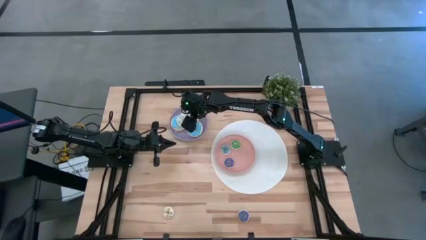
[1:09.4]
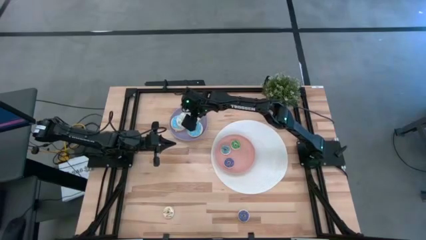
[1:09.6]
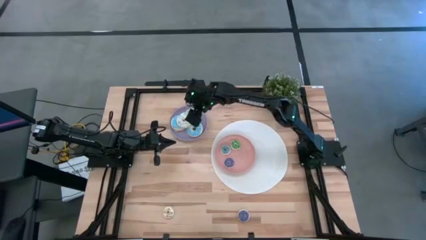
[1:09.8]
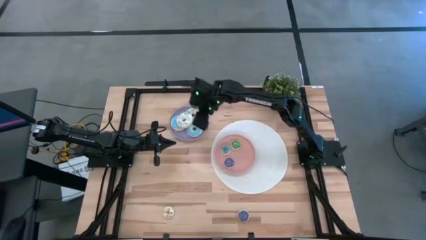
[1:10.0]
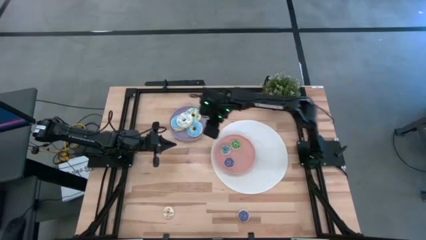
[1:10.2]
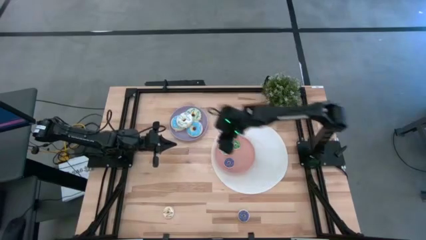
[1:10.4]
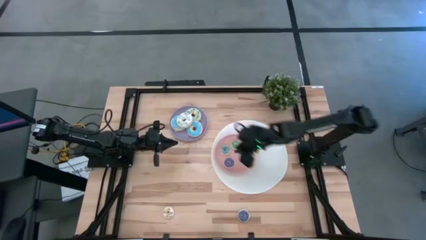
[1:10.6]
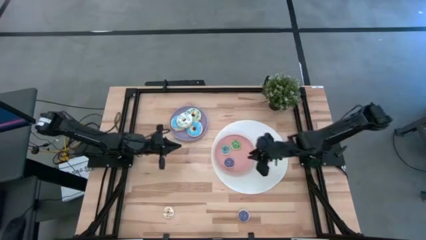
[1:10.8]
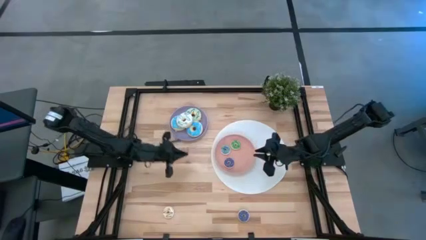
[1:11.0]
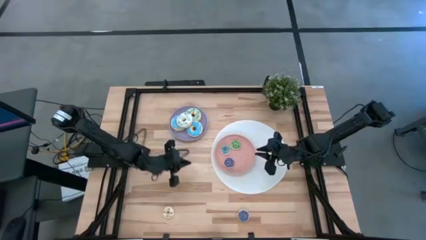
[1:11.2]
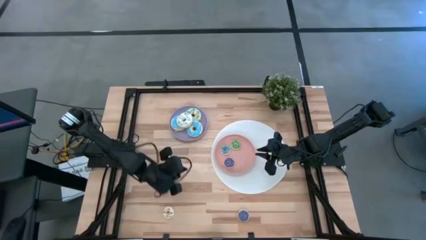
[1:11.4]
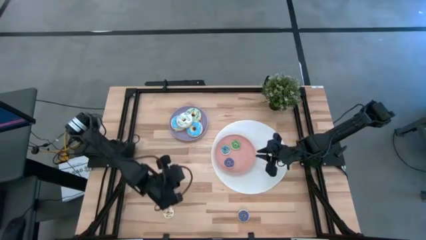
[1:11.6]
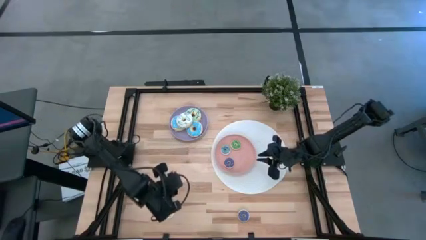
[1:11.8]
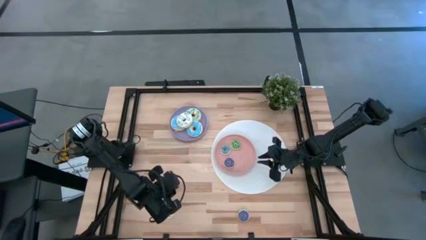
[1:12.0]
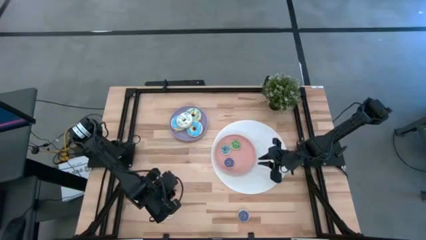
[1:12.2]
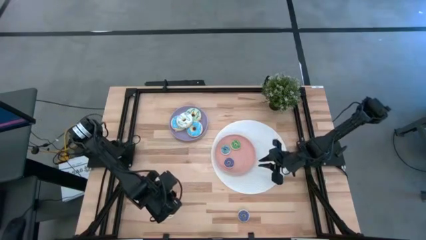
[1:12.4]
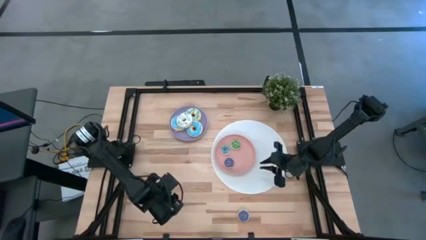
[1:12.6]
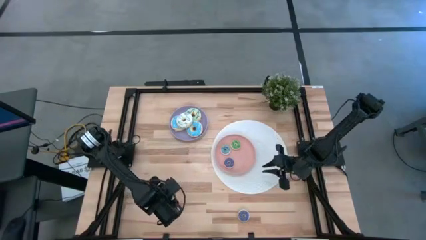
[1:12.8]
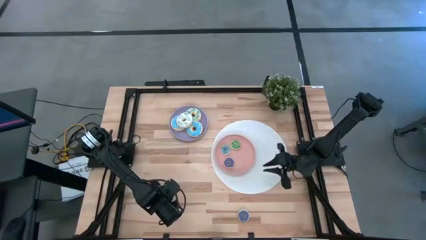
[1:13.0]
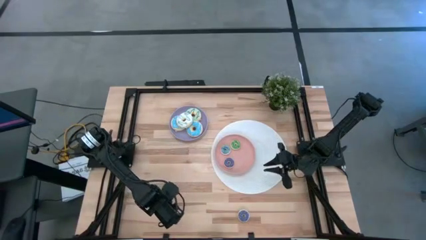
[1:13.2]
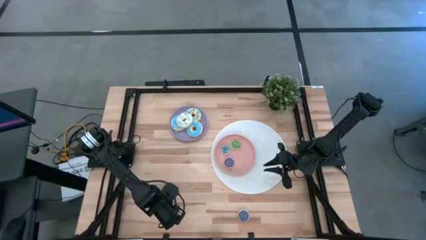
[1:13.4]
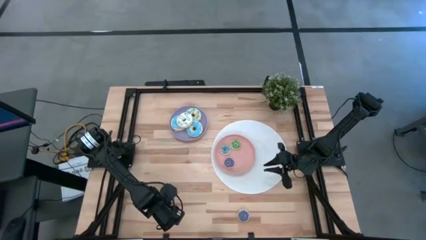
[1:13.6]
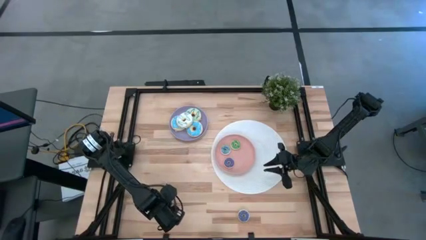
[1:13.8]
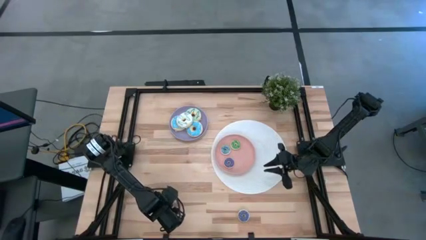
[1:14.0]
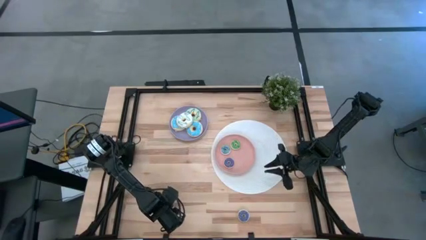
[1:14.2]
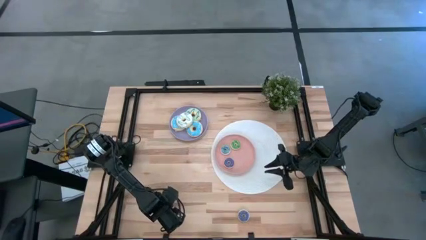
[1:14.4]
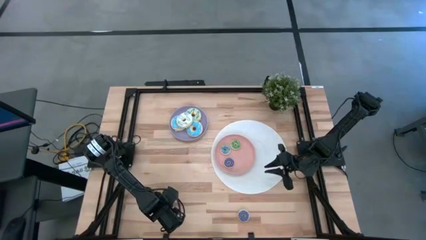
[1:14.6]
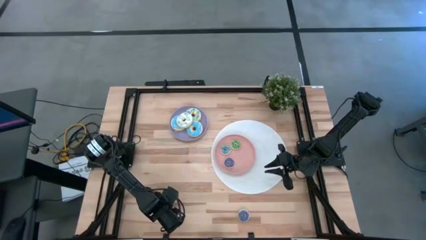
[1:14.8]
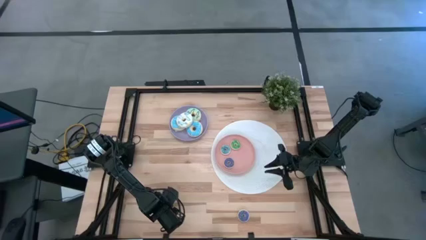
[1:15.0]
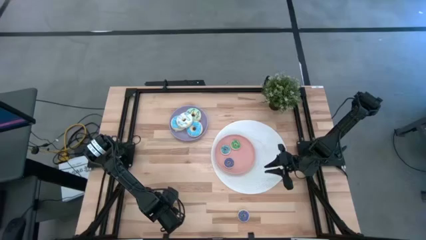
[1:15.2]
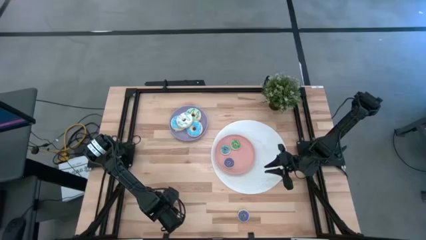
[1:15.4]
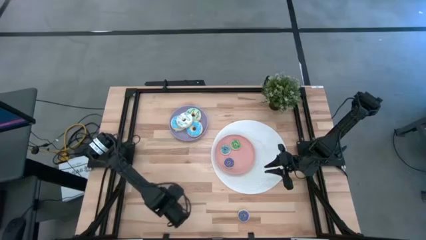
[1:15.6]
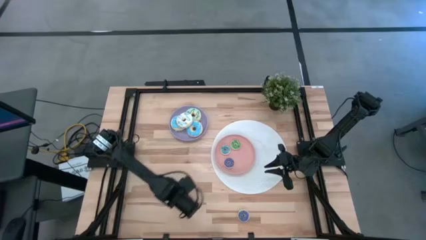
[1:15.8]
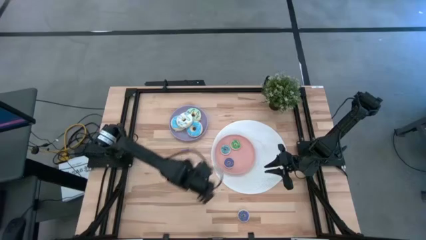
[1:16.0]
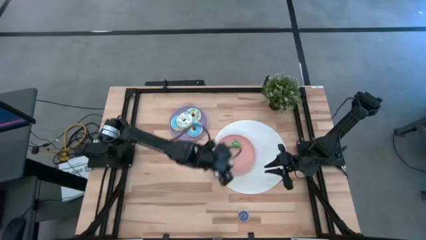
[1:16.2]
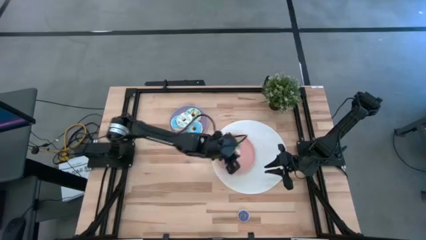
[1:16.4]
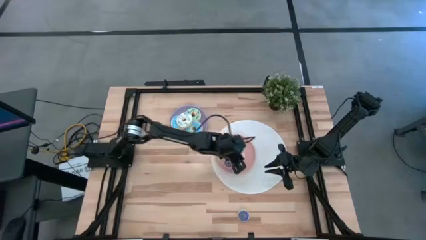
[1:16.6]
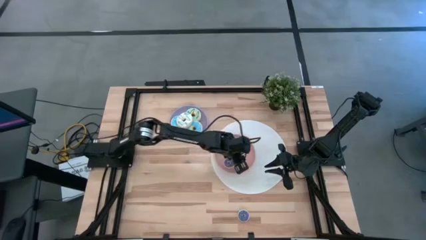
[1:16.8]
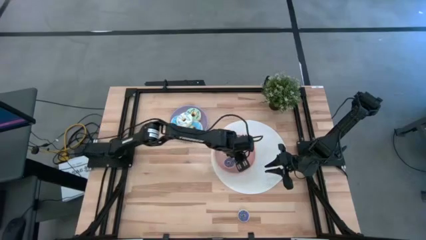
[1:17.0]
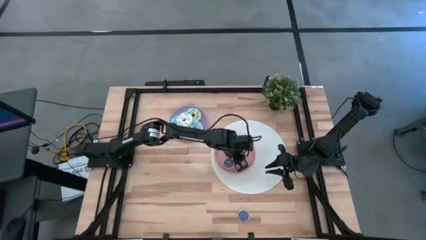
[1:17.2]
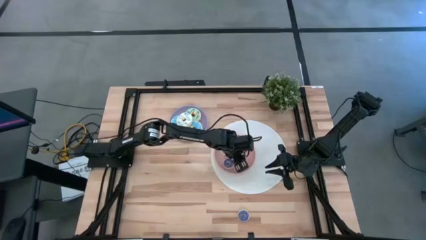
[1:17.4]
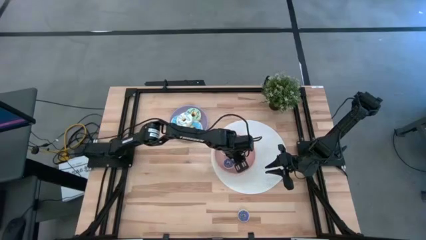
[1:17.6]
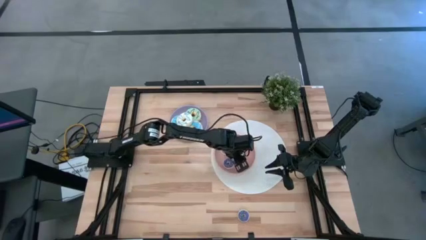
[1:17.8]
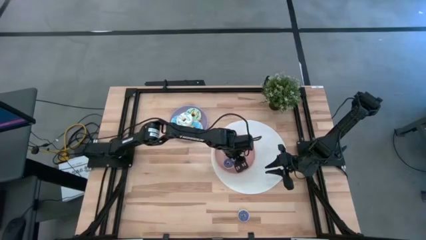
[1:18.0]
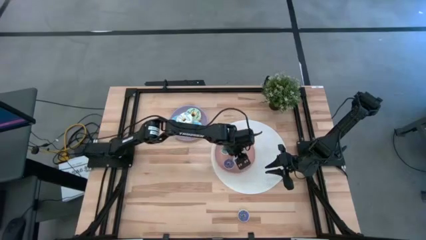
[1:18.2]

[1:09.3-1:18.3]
Task: Pick & Place donuts
Put the small white donut on the pink plate

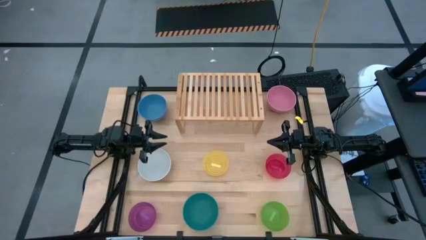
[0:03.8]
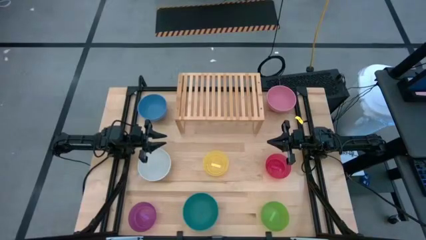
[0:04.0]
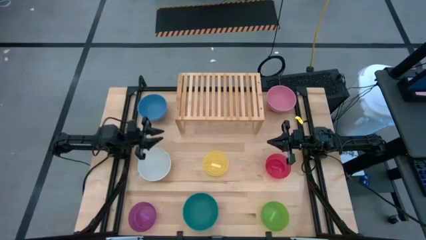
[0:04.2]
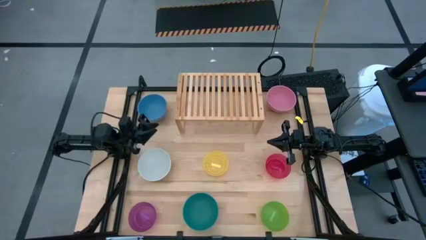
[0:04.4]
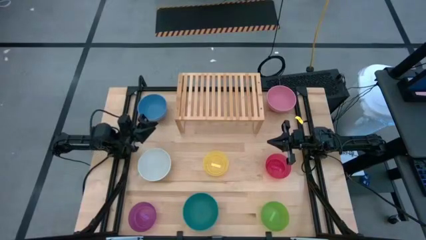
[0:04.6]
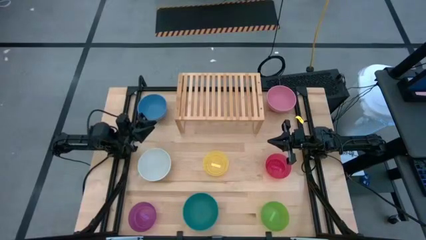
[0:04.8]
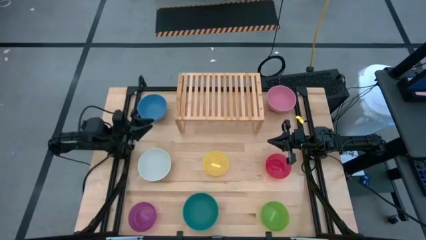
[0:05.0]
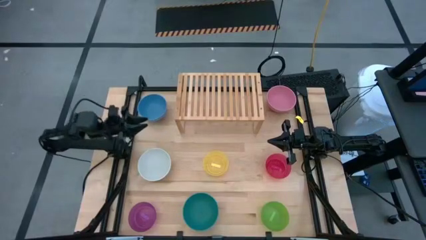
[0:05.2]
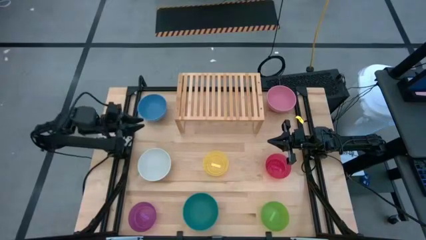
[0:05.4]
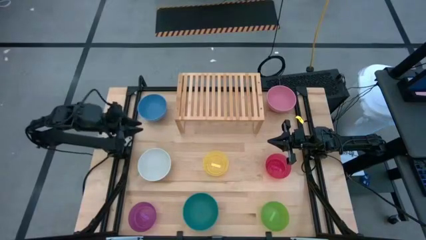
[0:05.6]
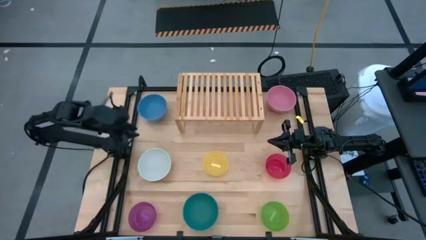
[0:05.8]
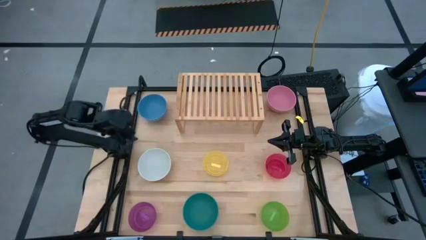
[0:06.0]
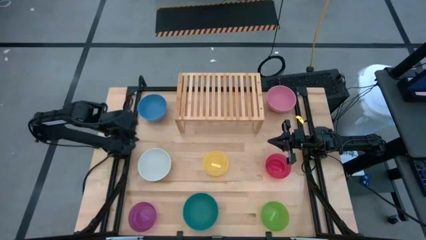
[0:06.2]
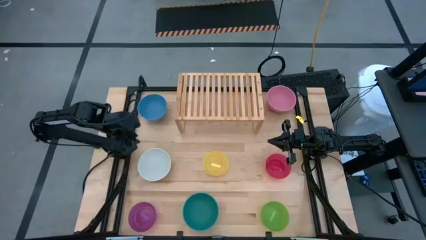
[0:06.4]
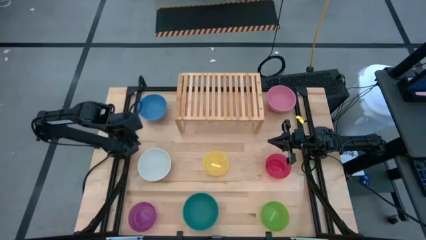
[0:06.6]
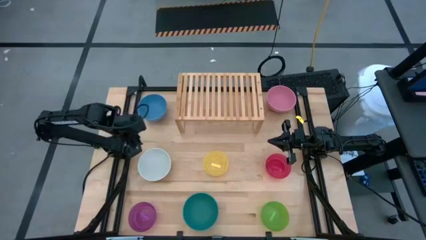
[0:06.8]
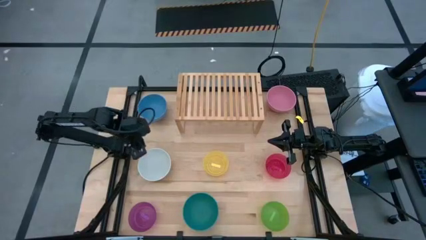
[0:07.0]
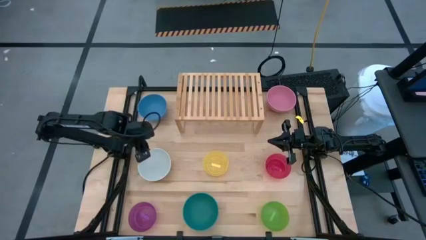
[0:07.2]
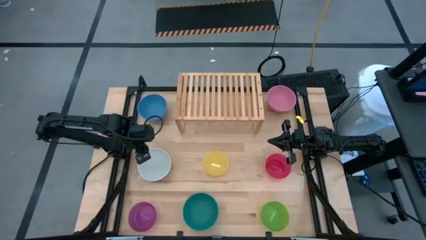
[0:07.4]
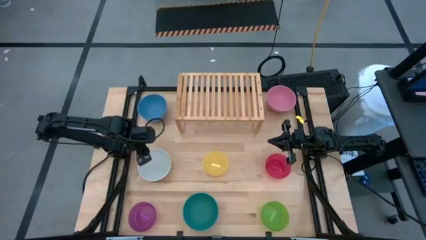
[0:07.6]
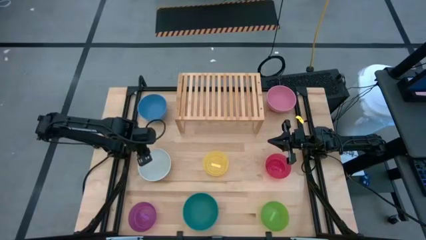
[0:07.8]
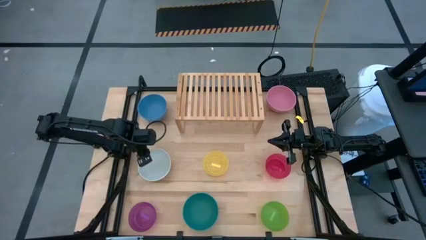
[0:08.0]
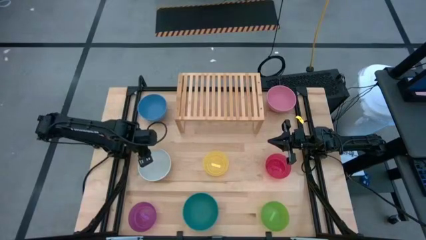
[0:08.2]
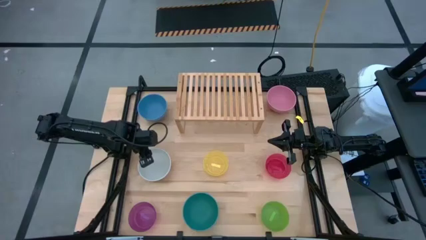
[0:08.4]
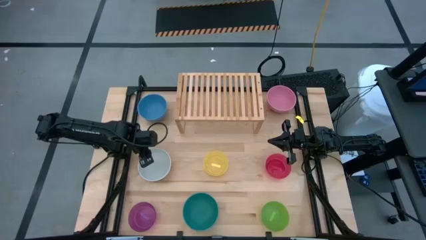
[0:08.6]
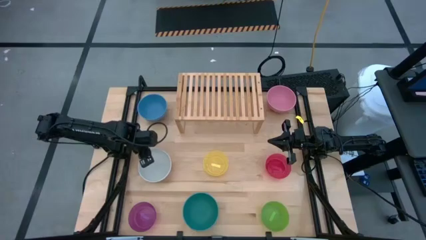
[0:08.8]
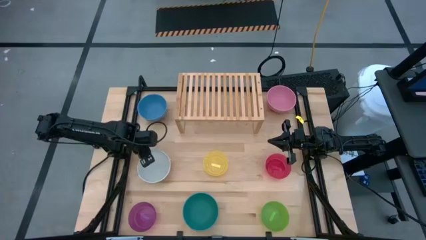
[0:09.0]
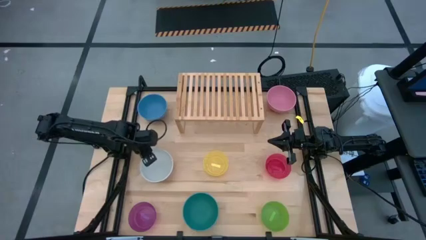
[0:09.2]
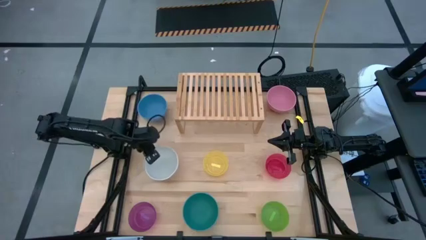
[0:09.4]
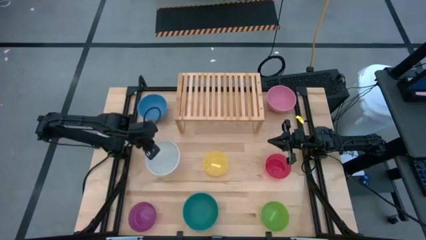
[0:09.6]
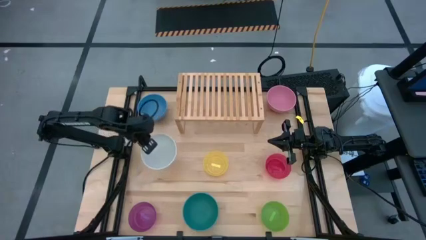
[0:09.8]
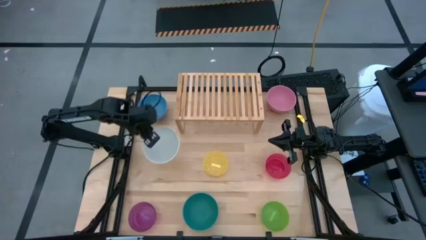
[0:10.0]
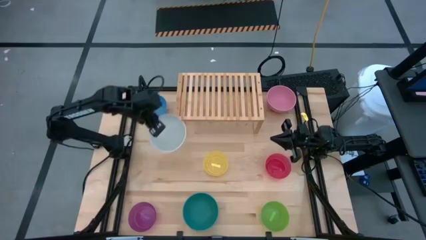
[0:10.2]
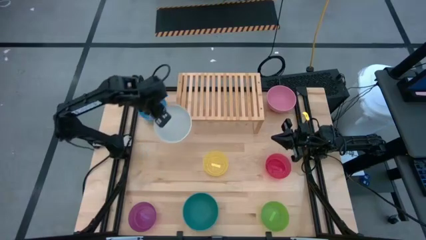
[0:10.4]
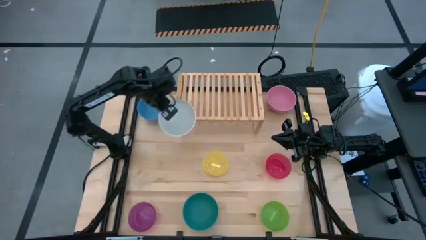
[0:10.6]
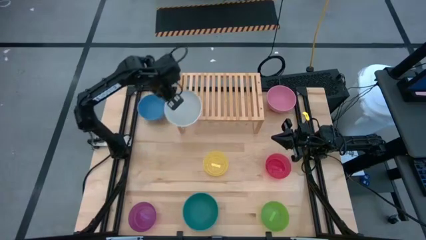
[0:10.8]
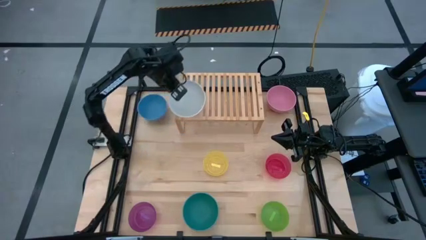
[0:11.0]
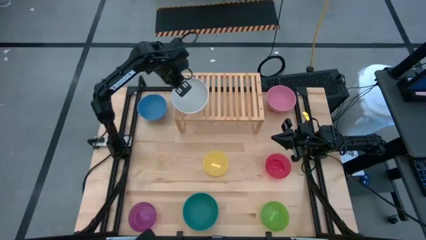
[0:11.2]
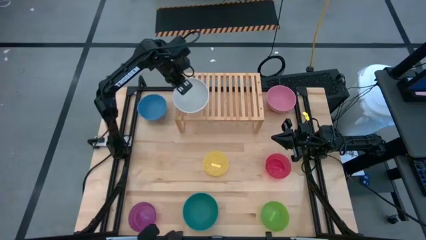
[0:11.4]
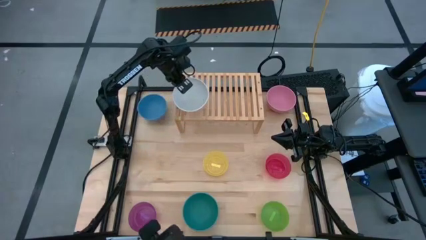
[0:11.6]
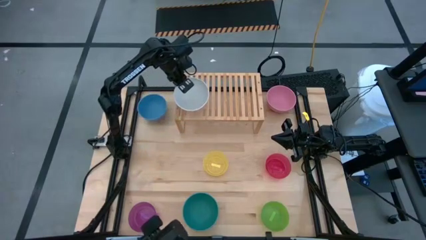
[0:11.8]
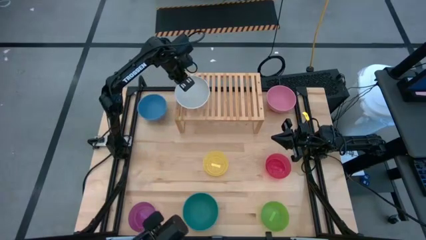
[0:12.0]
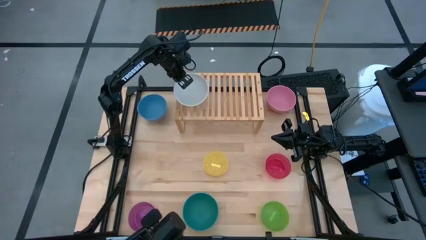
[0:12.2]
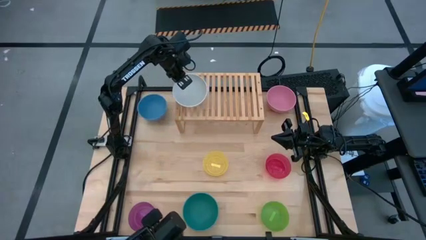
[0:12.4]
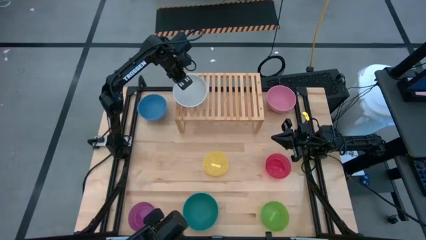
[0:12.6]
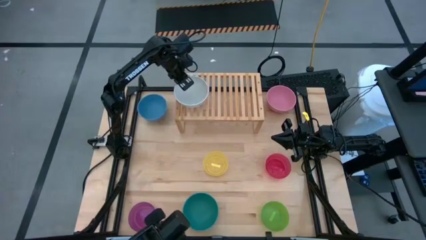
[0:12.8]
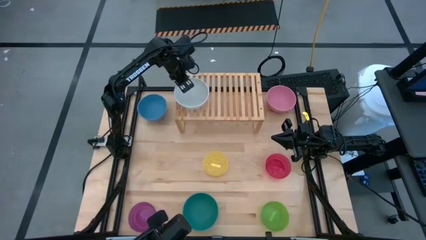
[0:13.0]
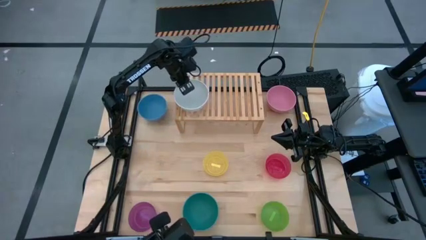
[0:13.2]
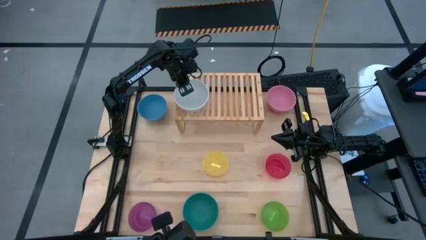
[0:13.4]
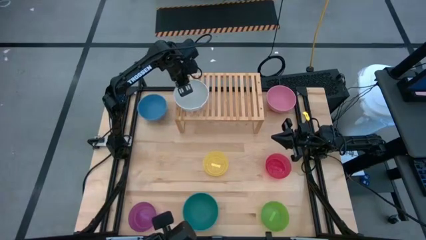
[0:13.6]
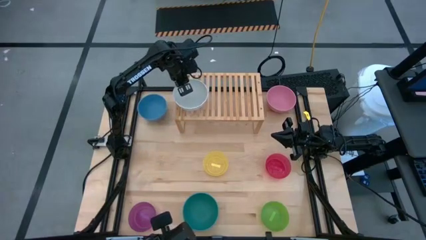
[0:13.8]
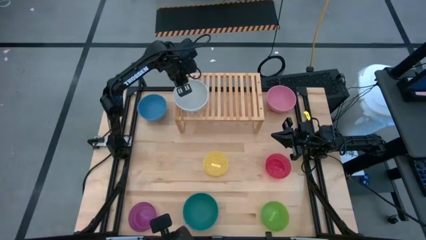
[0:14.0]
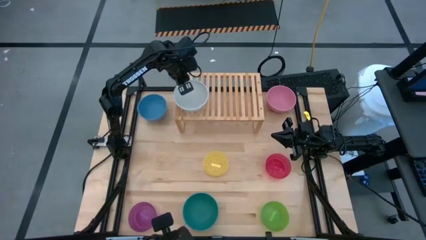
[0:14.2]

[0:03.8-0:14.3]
Task: Place and stack bowls onto a shelf
Put the white bowl on the shelf
